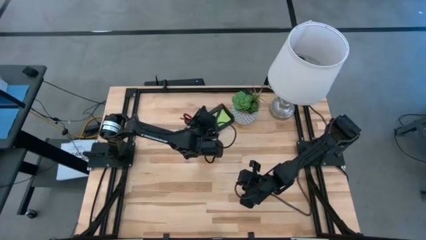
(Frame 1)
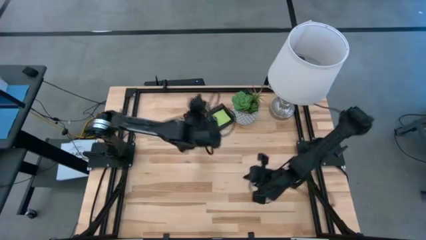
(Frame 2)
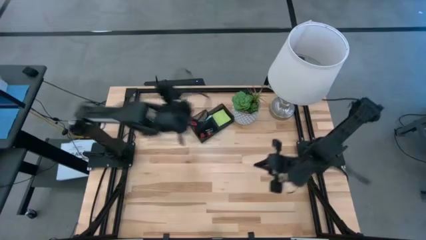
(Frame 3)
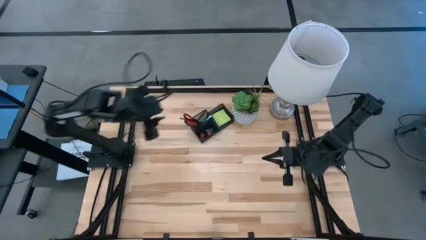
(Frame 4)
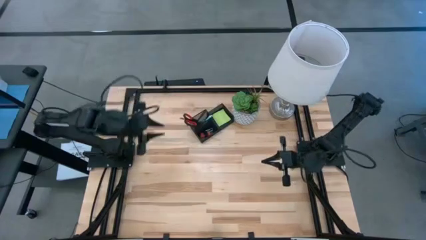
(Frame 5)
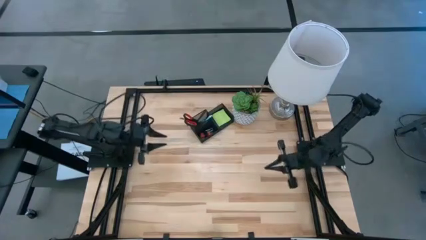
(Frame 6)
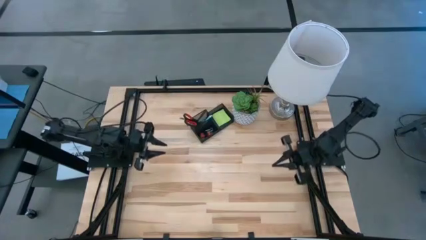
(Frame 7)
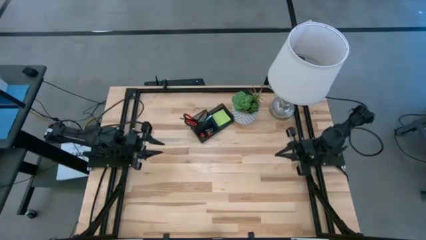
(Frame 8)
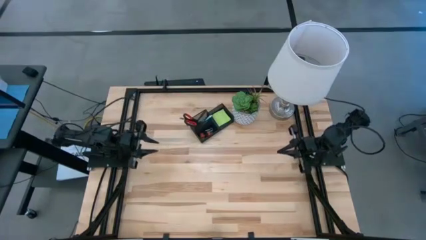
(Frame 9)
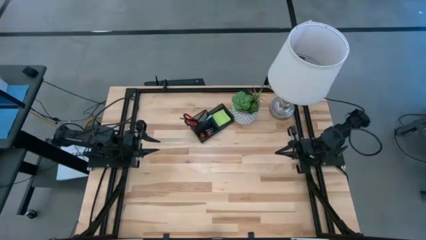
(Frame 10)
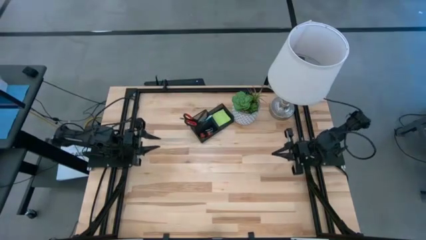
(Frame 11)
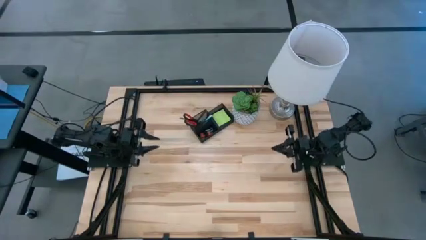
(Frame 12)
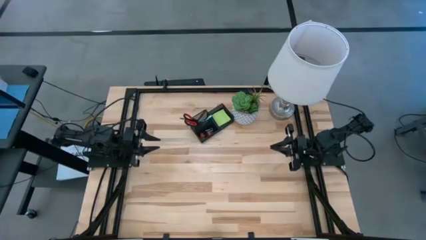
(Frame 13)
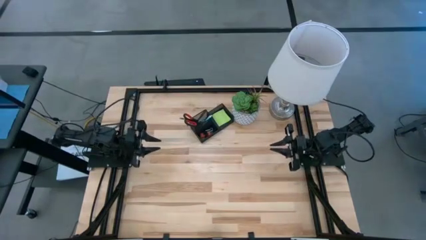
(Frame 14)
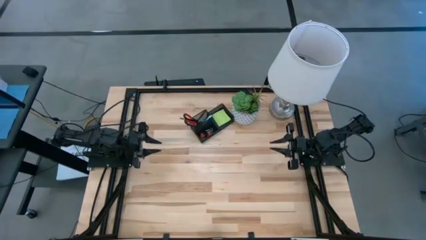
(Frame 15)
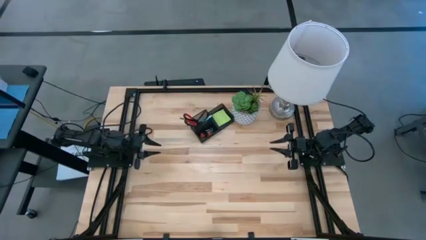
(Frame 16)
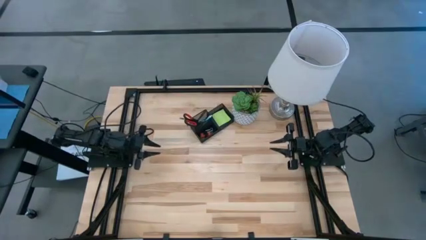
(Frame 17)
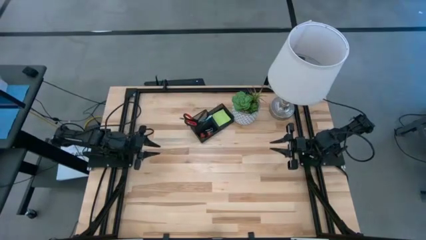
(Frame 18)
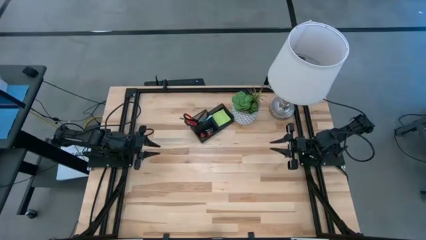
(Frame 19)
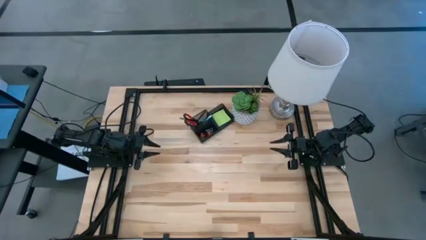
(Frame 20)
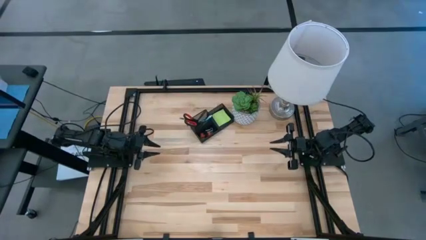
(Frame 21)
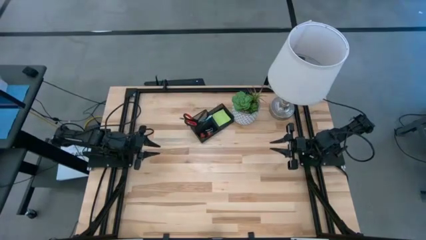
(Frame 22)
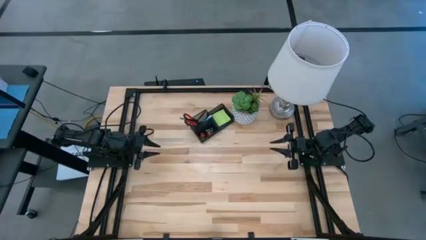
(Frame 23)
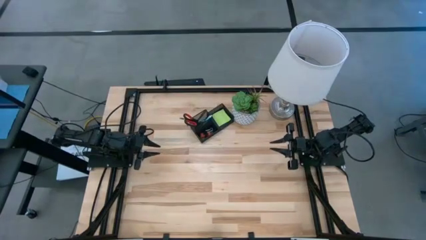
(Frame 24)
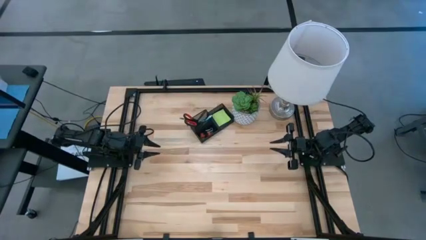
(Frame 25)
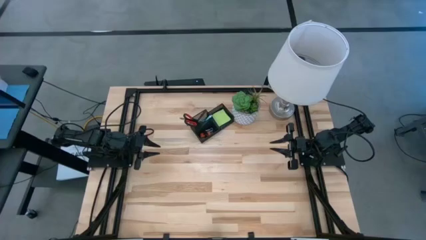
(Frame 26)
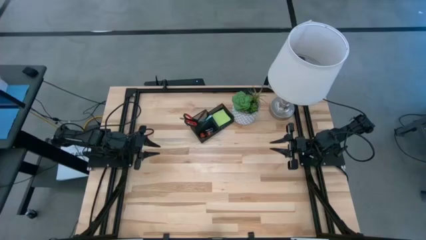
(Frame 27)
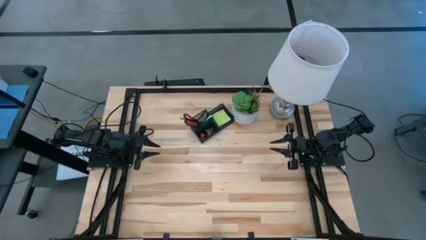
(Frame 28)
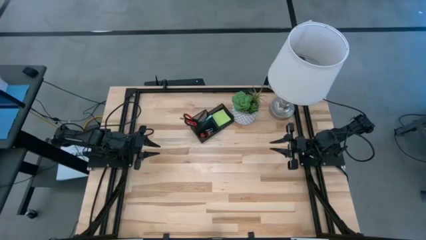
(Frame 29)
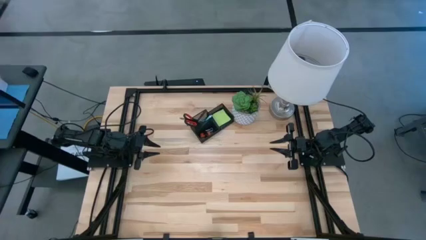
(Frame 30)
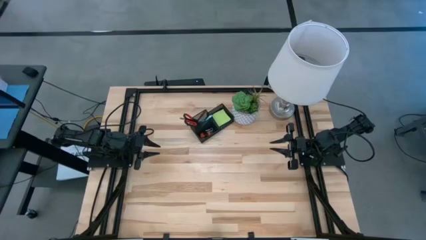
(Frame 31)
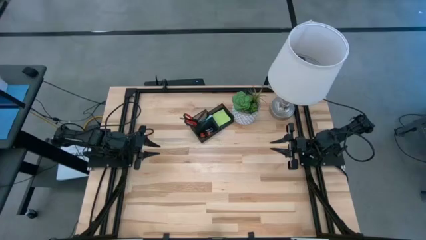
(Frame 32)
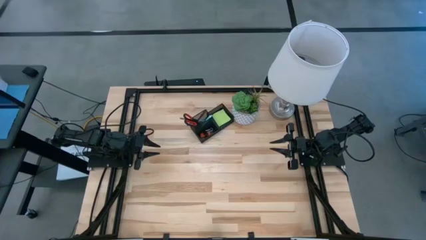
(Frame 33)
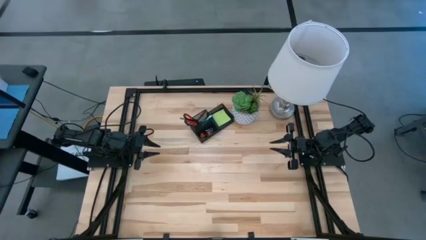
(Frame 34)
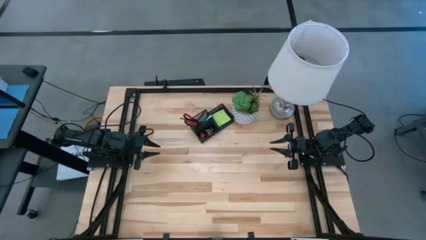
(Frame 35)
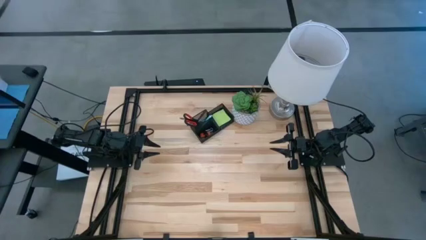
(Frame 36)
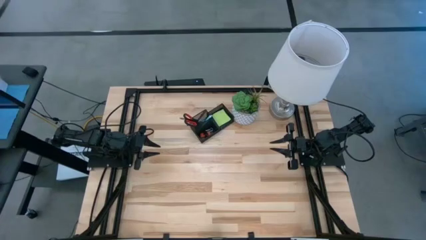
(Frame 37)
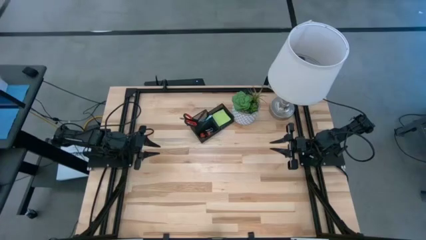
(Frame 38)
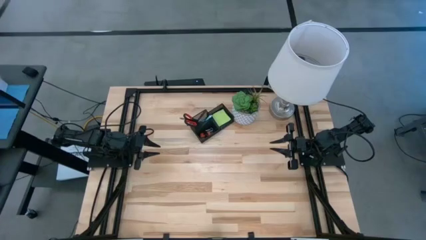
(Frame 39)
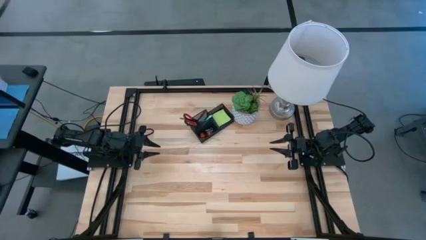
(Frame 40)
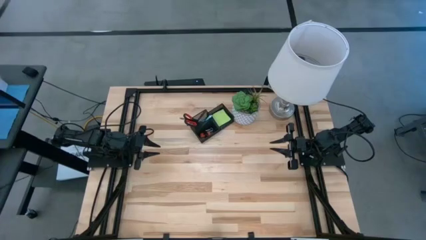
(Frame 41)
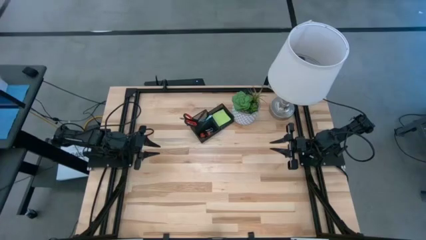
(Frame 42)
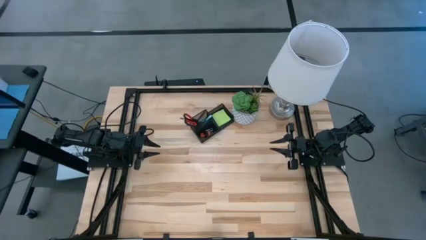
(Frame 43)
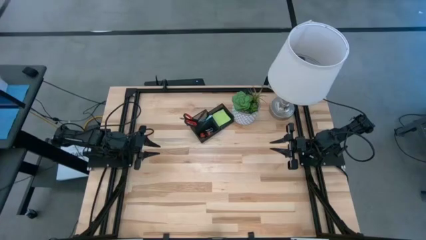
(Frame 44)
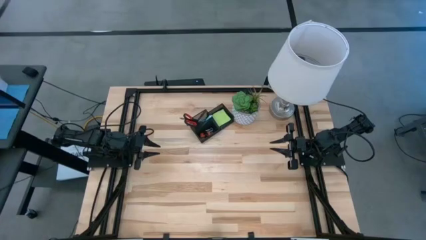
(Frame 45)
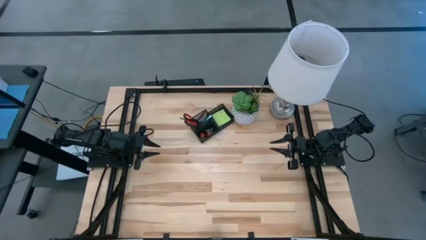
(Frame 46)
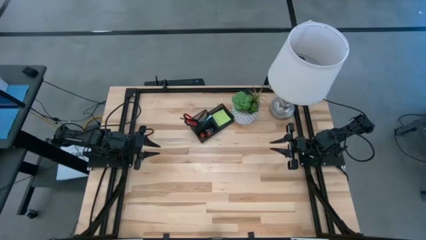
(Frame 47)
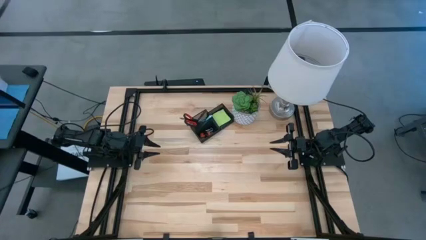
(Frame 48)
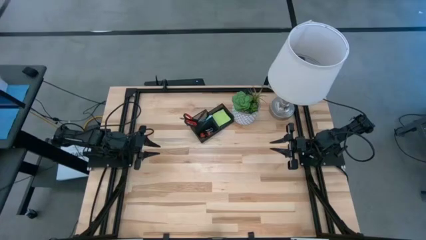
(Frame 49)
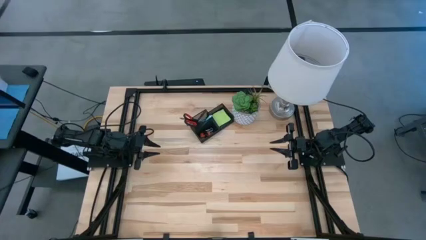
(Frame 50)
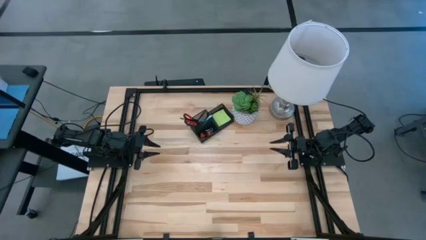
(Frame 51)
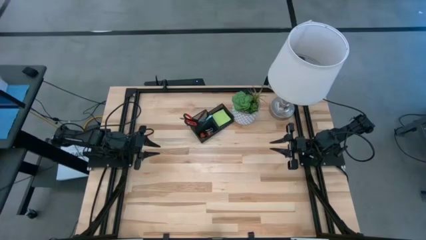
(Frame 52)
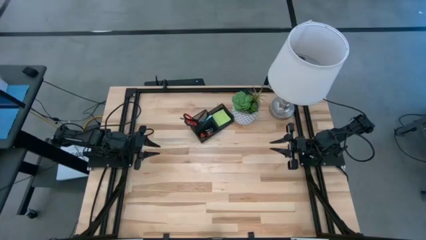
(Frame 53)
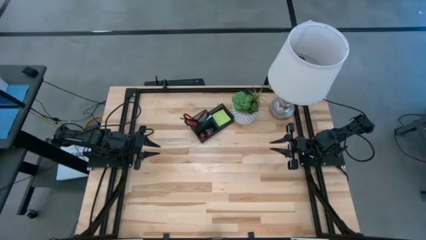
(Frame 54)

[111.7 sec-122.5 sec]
Task: Pick and place office supplies into organizer
Return to Home Position
